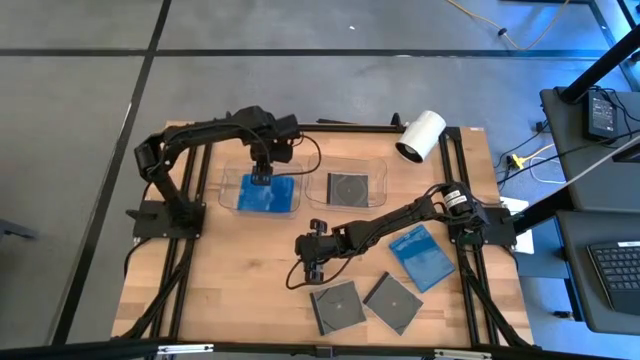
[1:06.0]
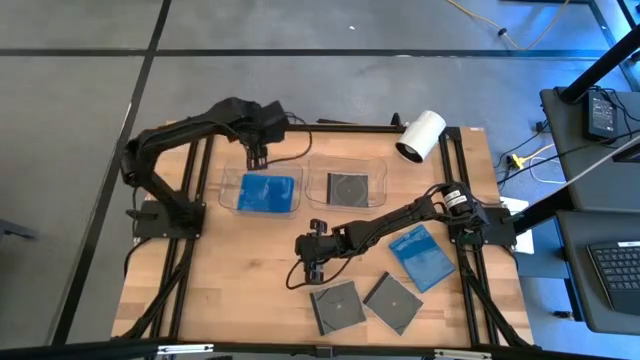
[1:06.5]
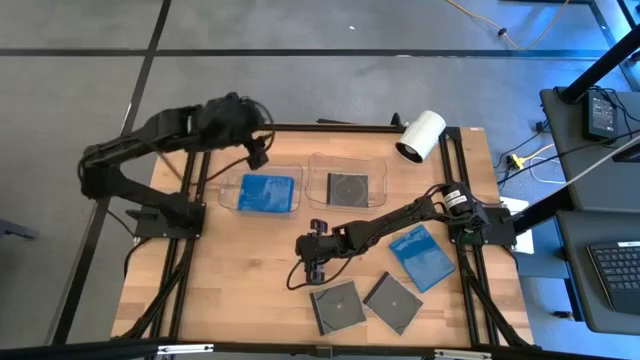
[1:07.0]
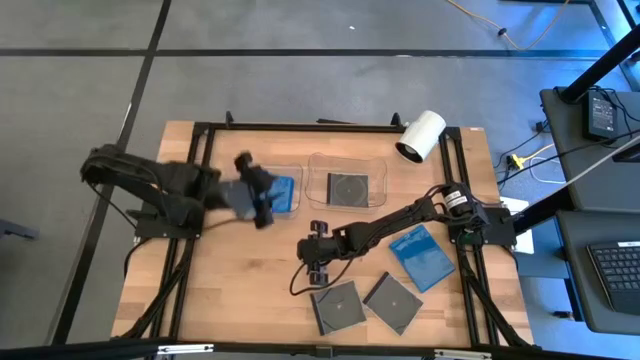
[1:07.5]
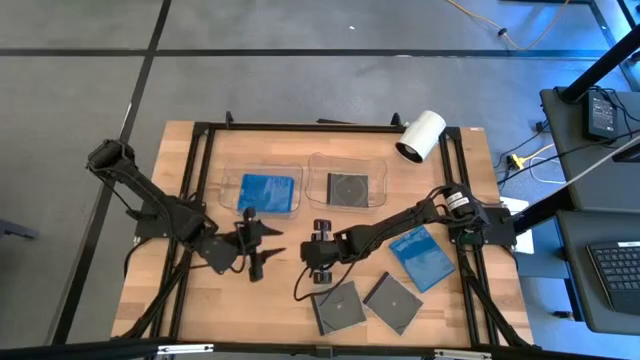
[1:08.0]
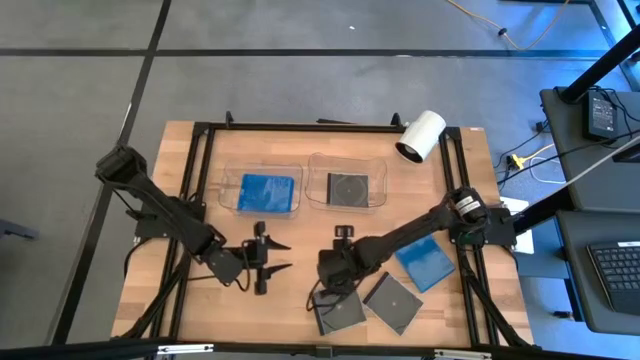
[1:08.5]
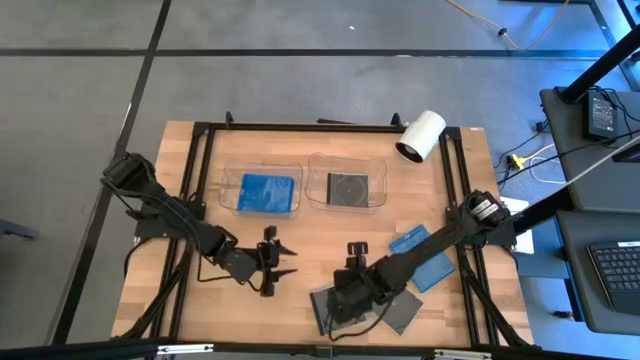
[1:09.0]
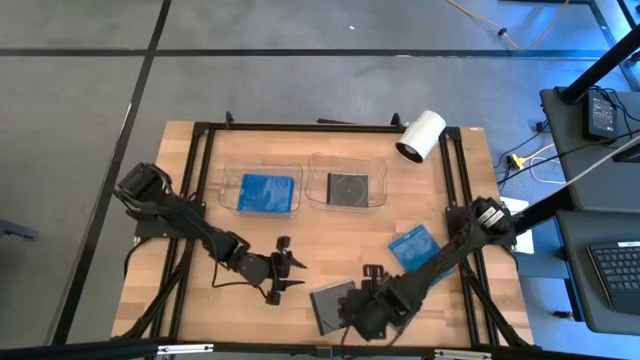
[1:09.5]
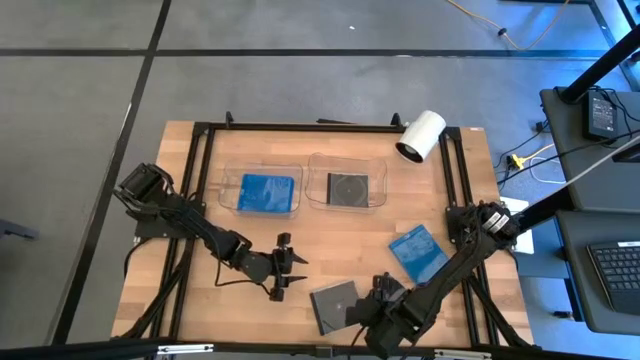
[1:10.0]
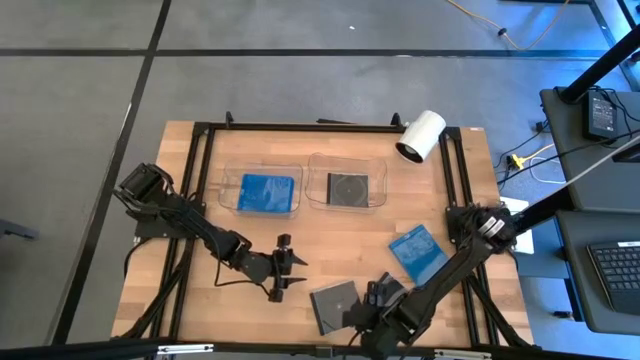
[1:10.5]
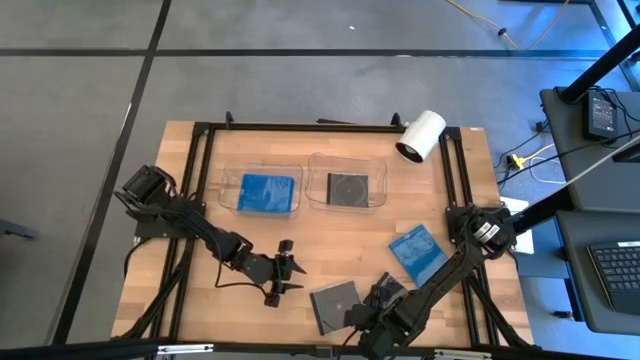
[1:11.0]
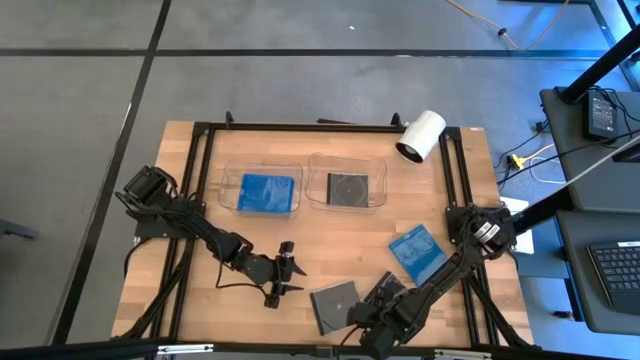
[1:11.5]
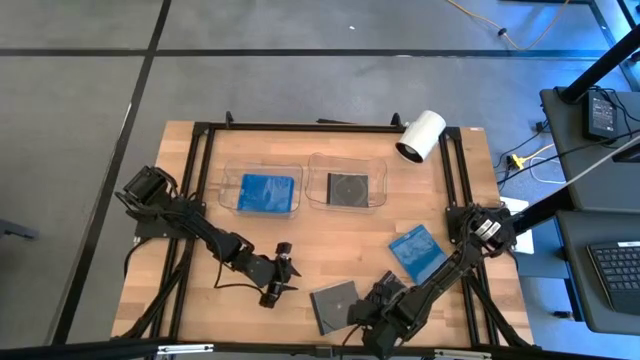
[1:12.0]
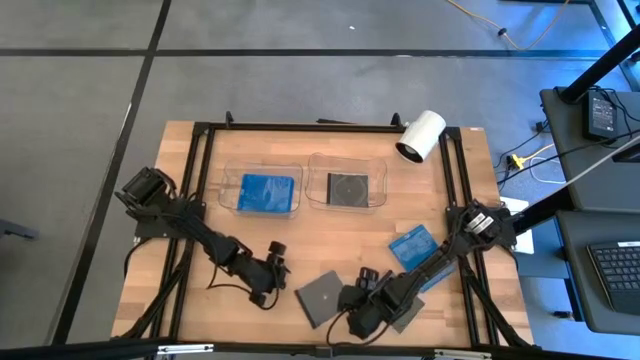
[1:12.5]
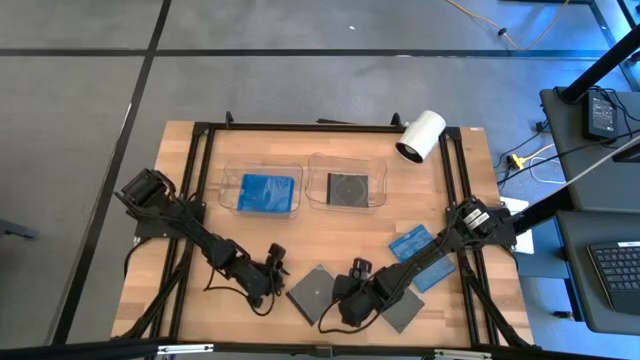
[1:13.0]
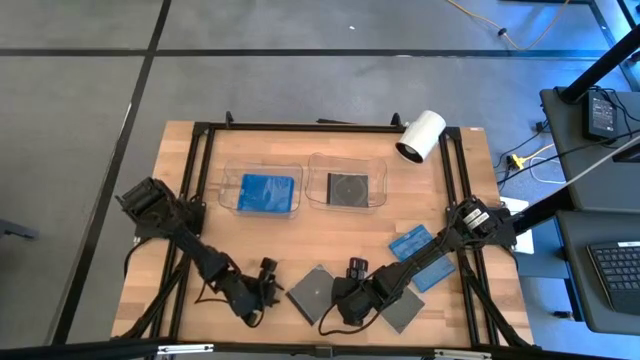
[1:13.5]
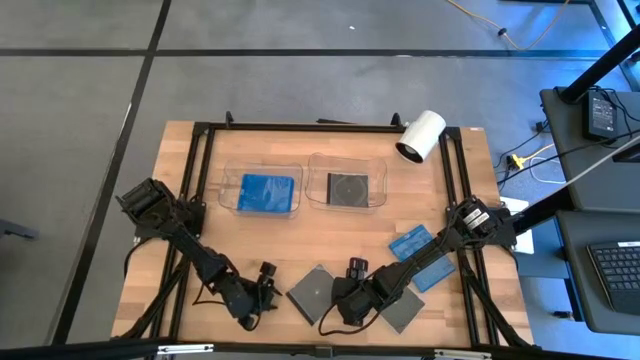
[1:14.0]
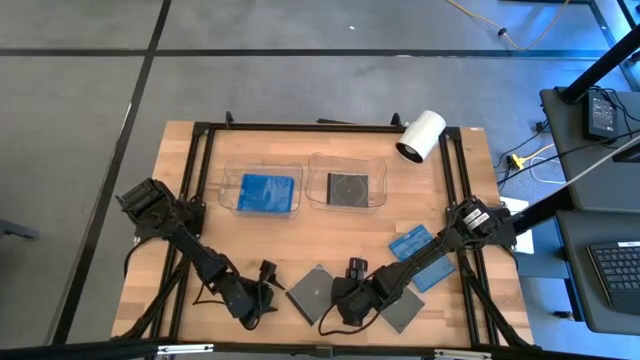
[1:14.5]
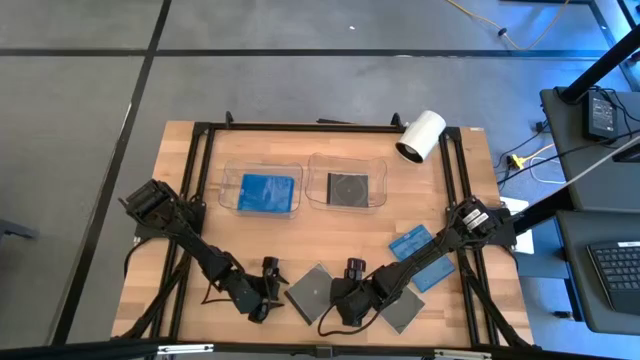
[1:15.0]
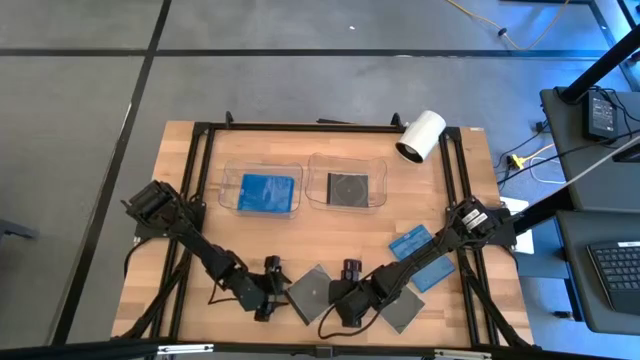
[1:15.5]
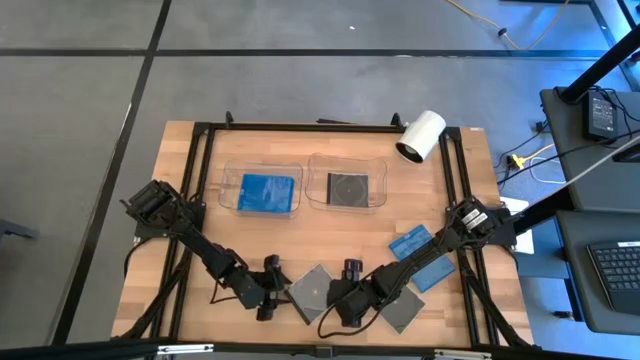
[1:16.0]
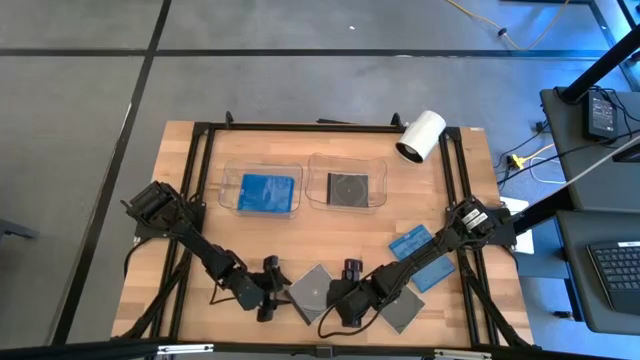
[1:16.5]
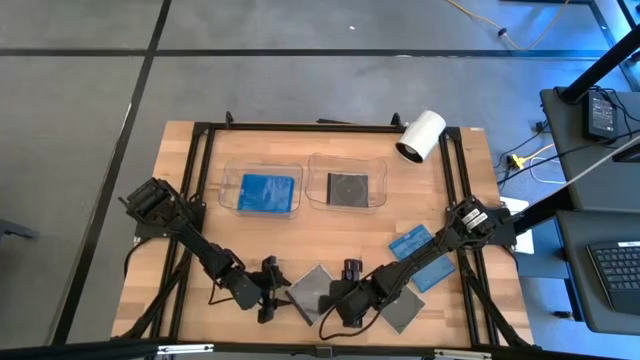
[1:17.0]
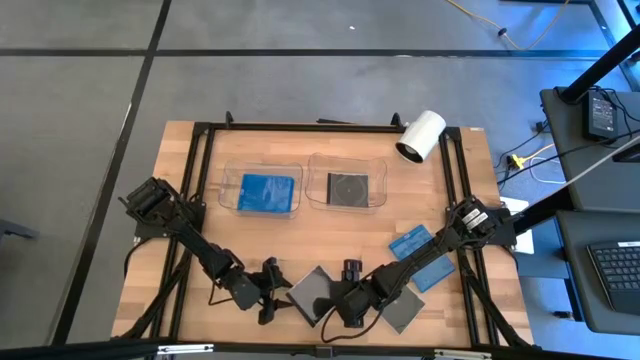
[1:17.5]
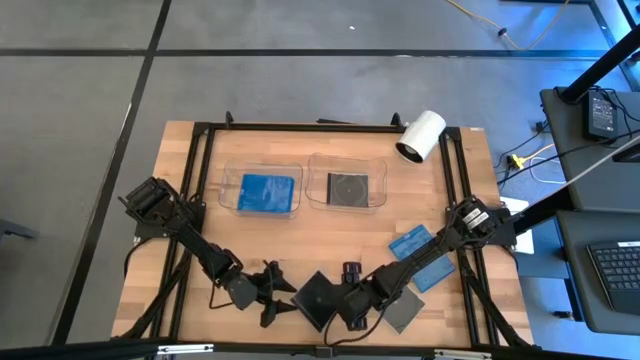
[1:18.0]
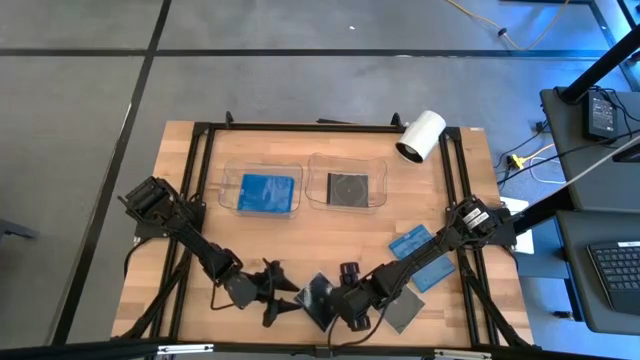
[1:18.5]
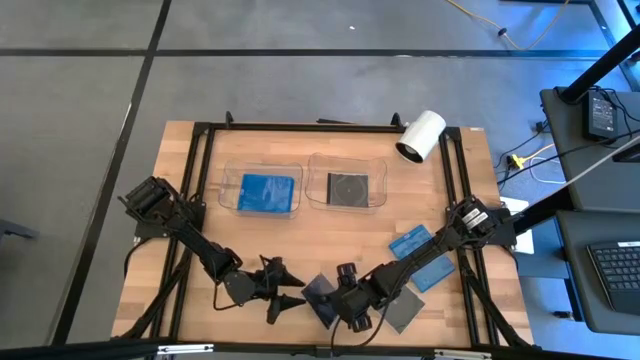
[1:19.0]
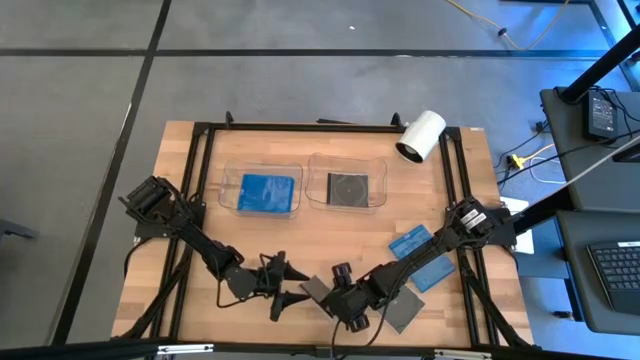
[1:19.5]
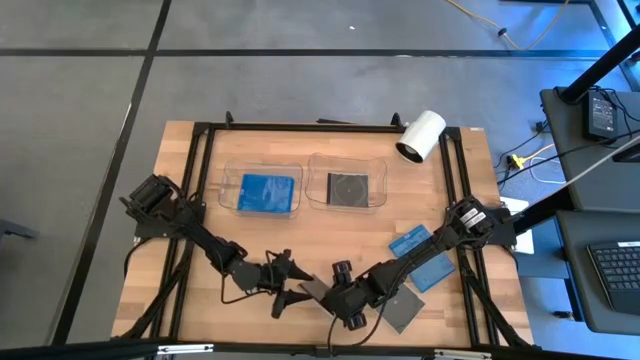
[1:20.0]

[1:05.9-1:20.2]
Task: Pick & place jewel cases by type
Put the left black CD case into the right transparent bin

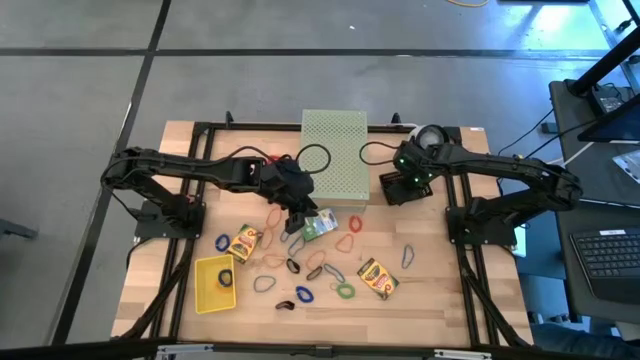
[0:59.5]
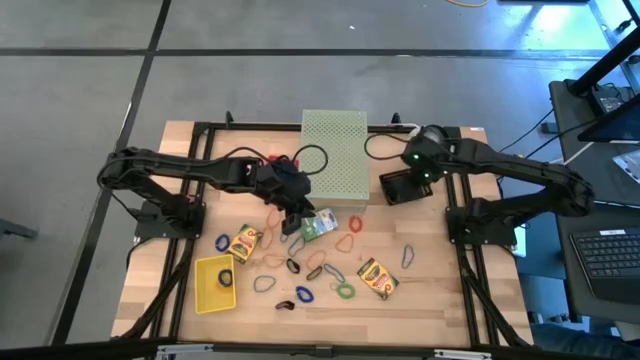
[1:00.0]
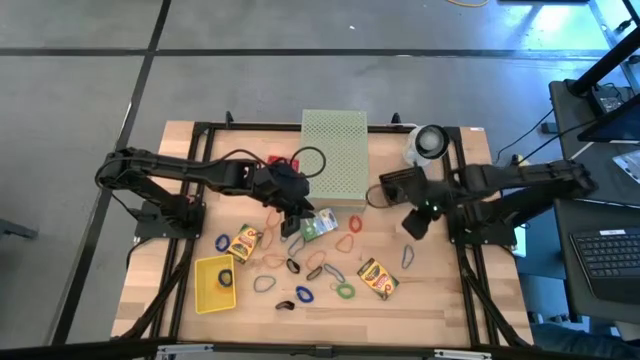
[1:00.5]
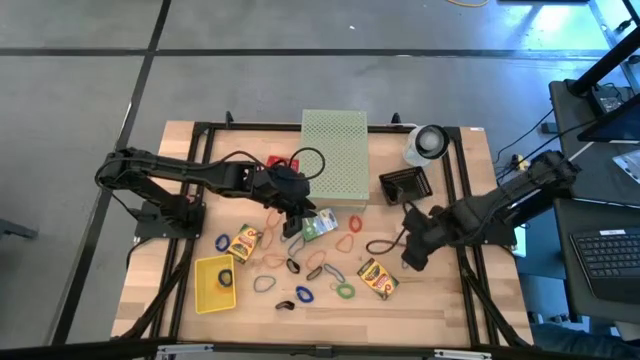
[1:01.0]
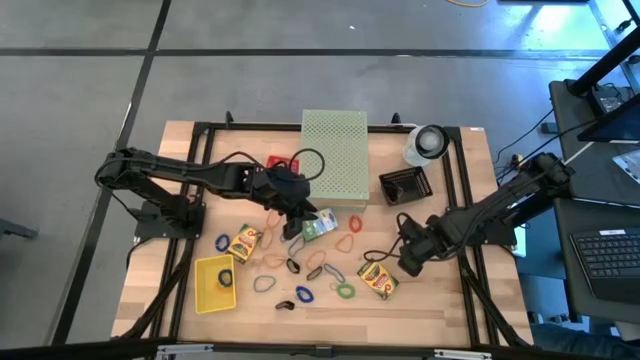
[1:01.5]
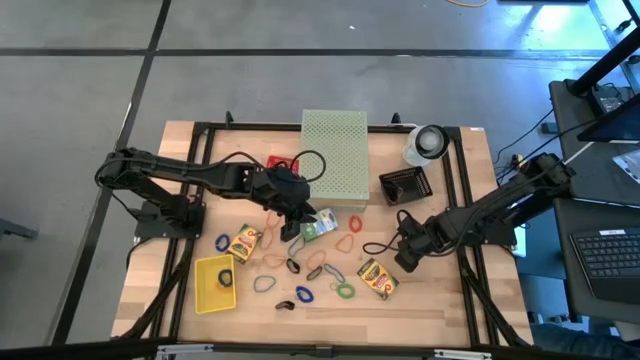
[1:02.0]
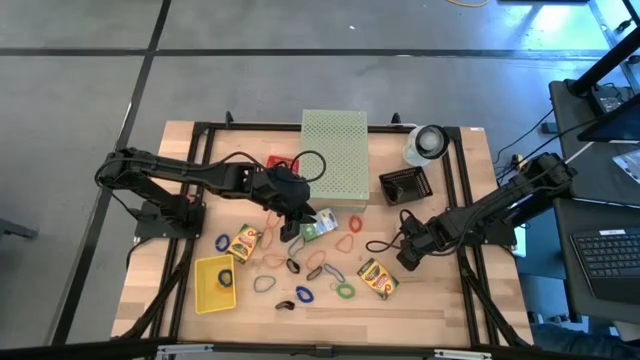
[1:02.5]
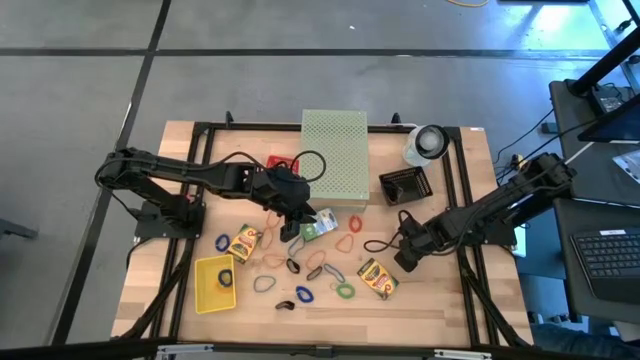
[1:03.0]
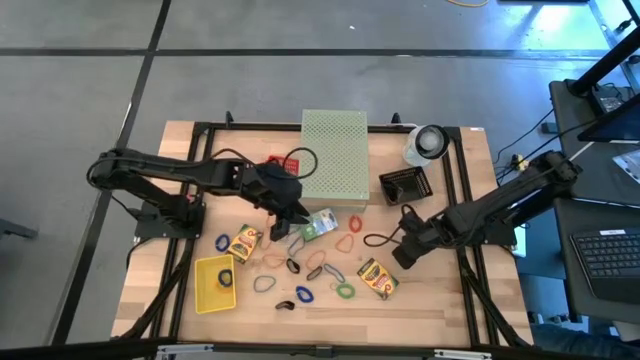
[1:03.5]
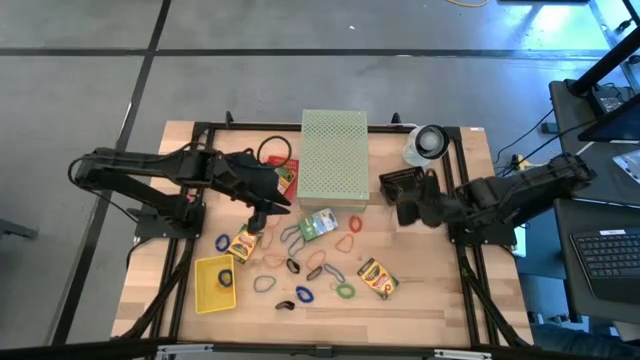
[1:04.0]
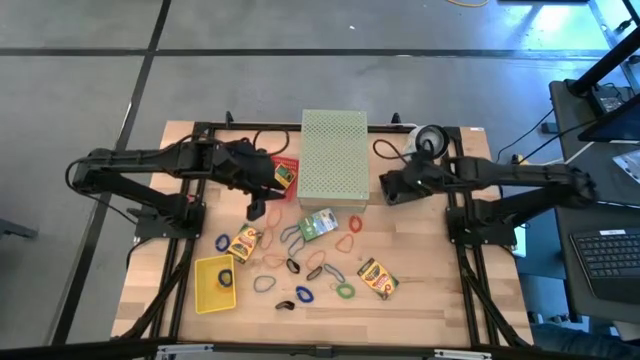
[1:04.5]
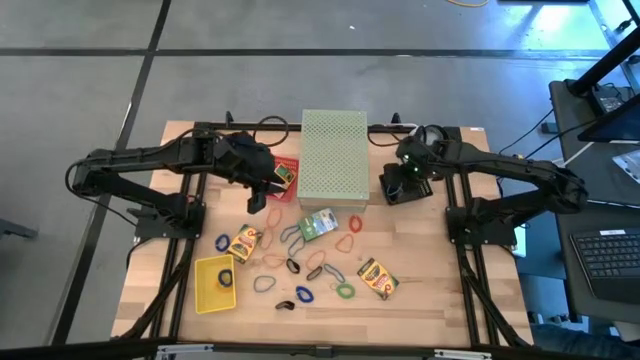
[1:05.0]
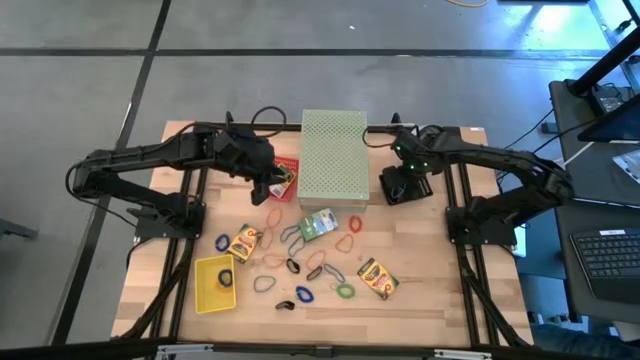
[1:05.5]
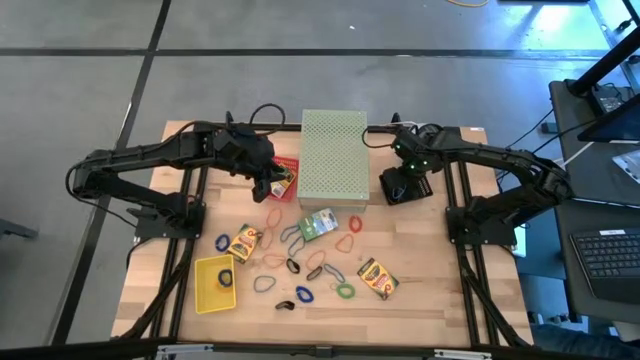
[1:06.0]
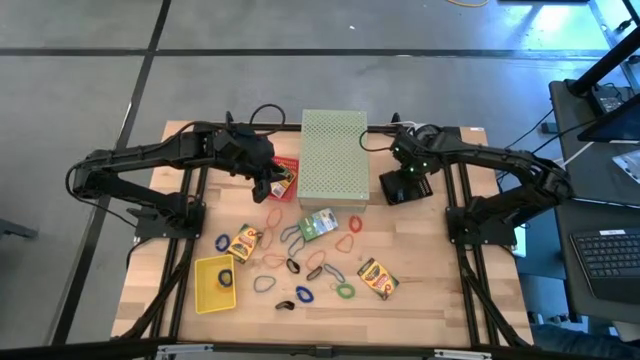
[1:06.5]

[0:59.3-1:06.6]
Task: Pick & Place Office Desk Supplies
Put the blue rubber band into the black bin
